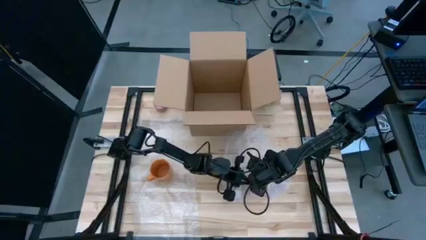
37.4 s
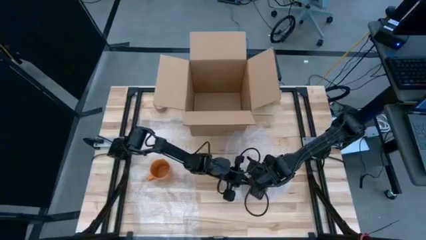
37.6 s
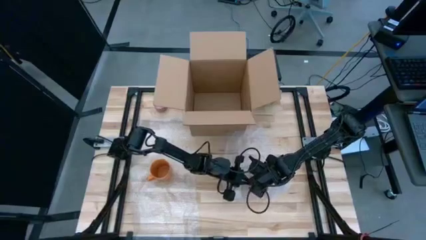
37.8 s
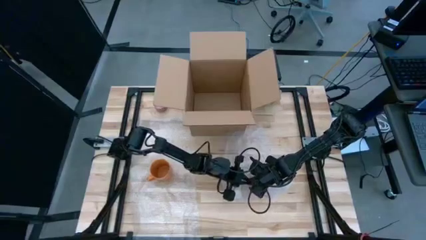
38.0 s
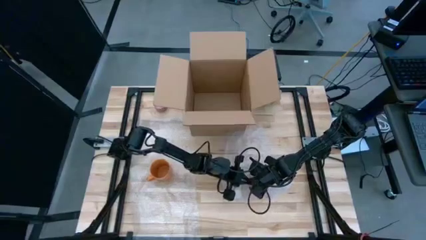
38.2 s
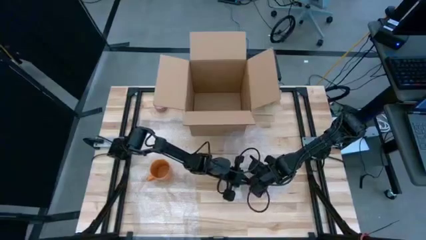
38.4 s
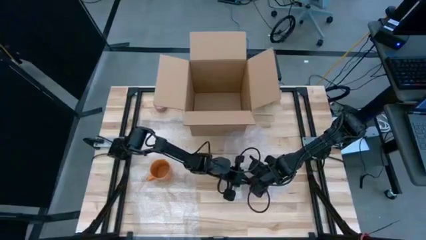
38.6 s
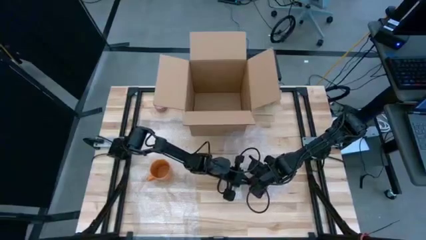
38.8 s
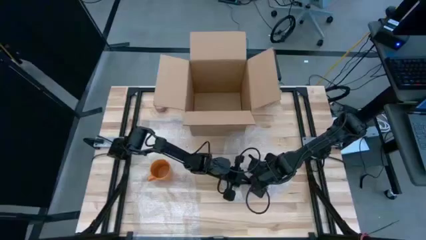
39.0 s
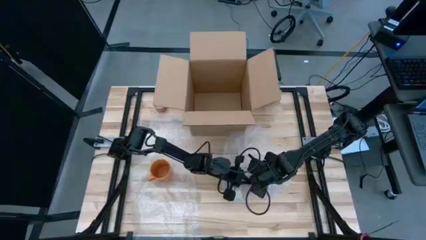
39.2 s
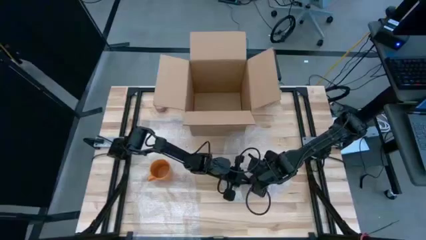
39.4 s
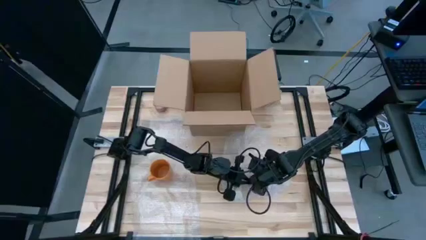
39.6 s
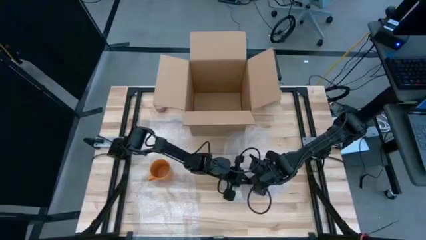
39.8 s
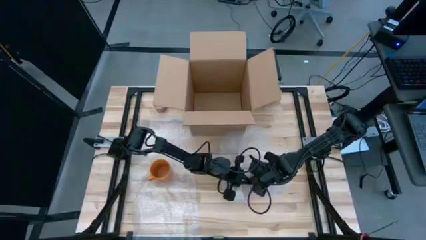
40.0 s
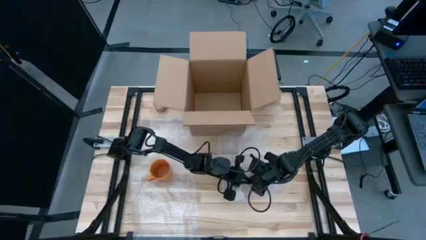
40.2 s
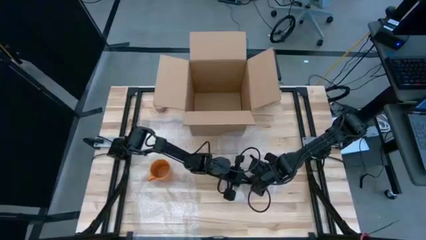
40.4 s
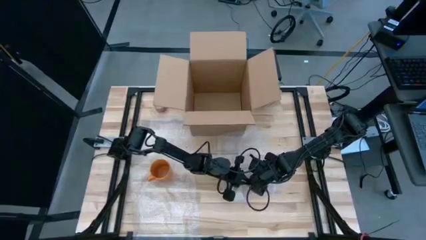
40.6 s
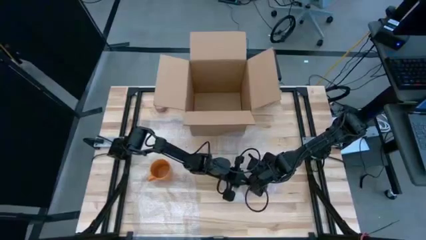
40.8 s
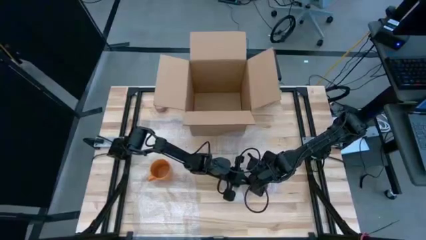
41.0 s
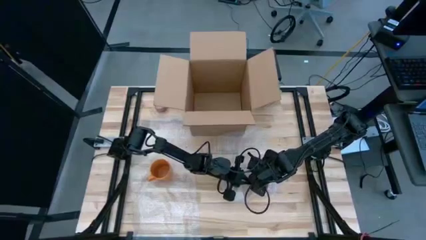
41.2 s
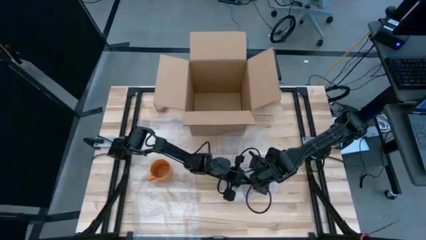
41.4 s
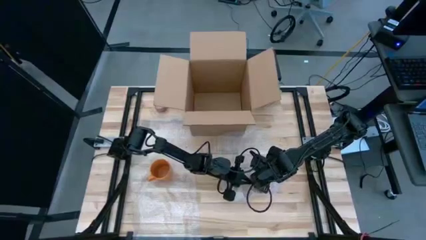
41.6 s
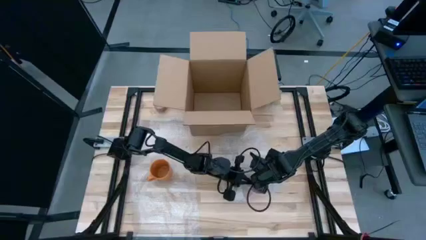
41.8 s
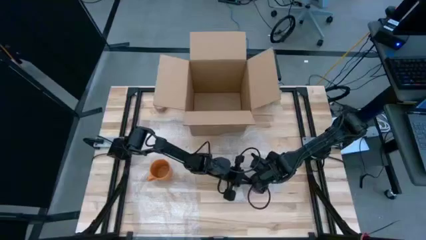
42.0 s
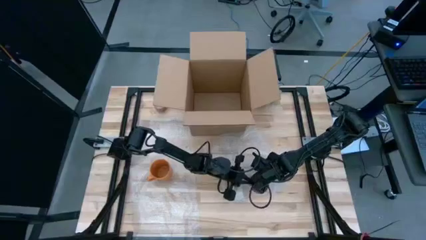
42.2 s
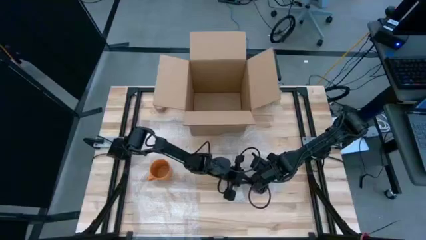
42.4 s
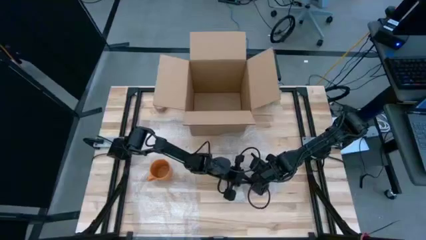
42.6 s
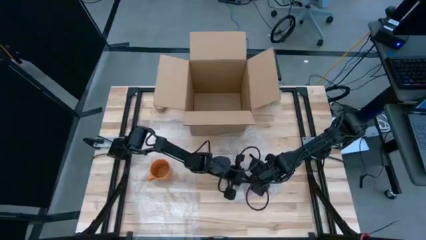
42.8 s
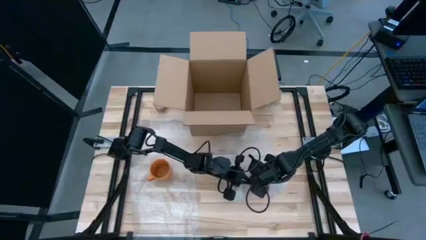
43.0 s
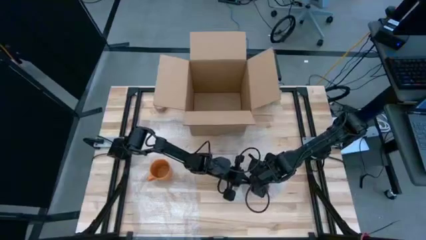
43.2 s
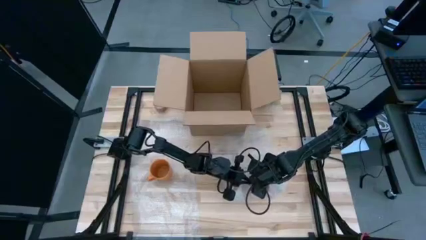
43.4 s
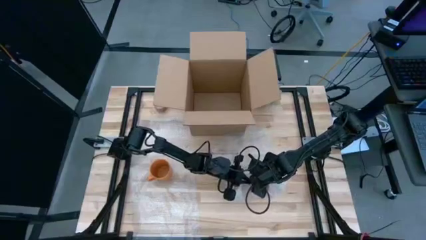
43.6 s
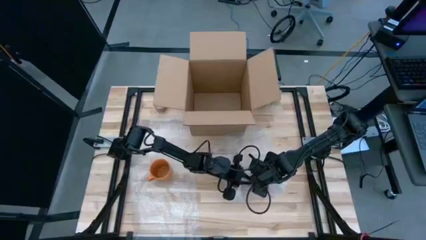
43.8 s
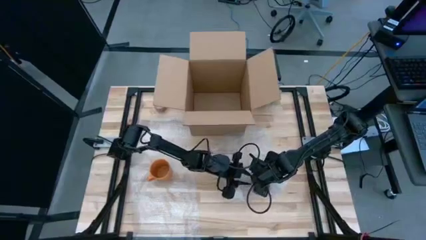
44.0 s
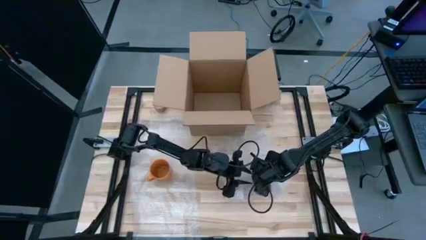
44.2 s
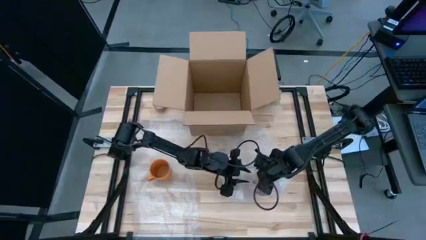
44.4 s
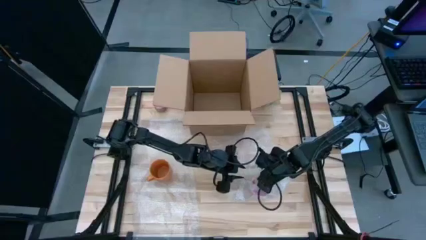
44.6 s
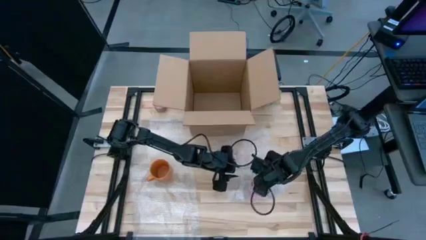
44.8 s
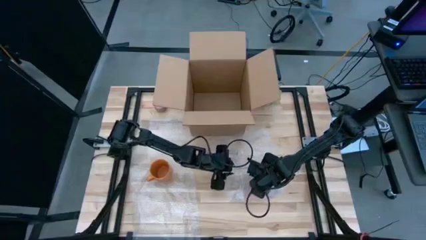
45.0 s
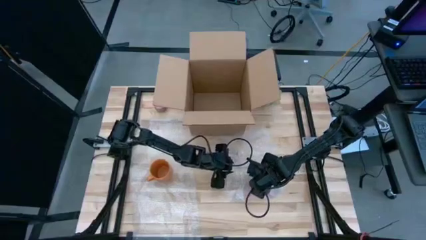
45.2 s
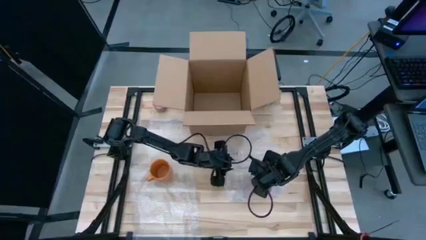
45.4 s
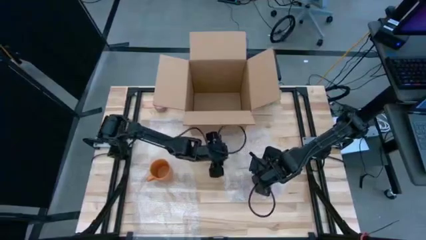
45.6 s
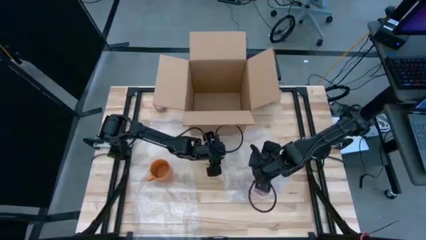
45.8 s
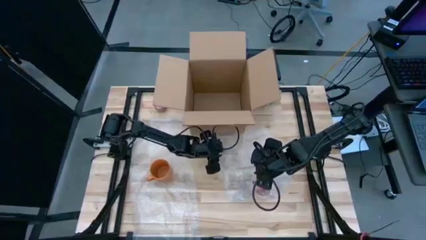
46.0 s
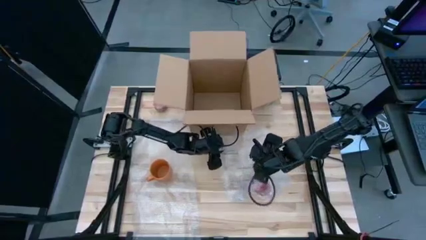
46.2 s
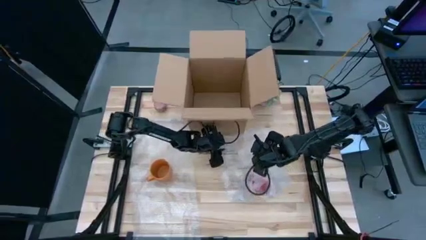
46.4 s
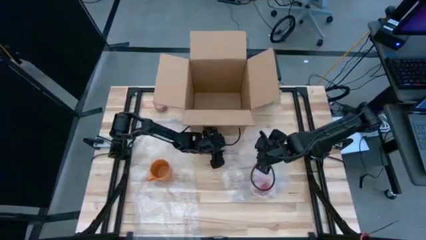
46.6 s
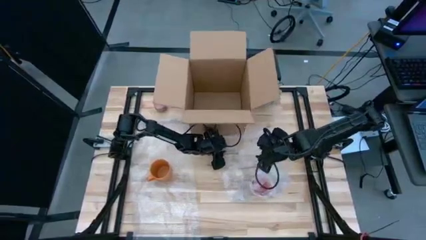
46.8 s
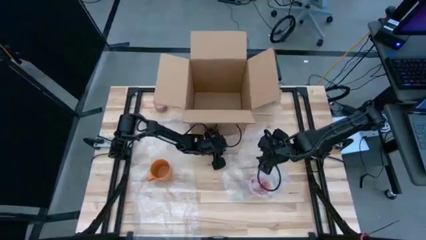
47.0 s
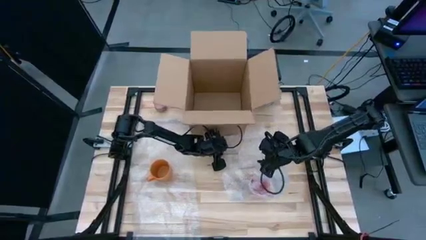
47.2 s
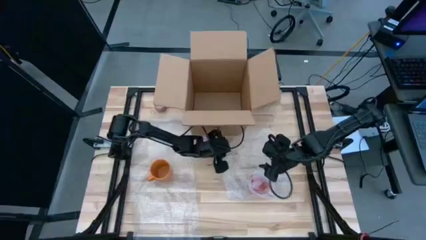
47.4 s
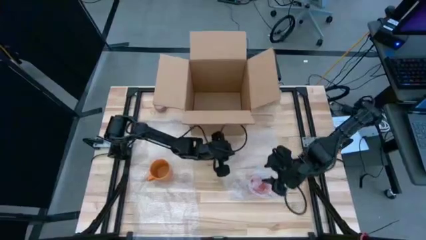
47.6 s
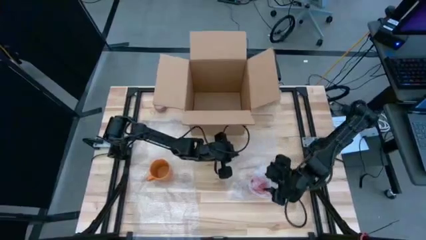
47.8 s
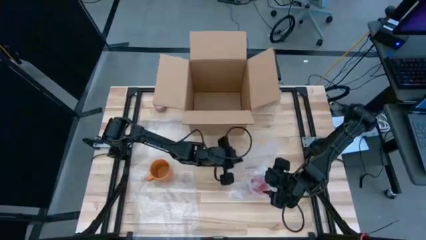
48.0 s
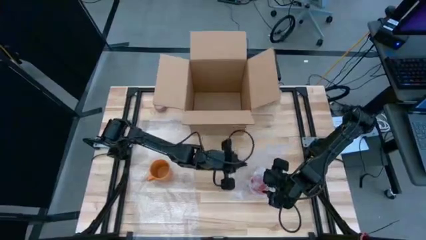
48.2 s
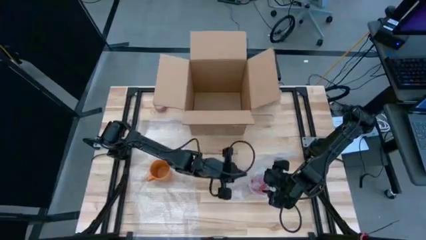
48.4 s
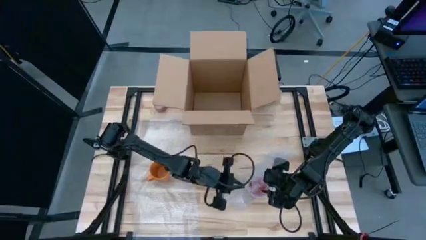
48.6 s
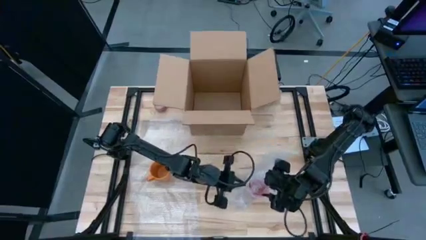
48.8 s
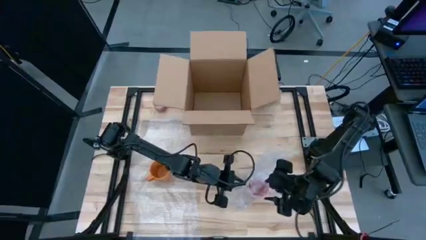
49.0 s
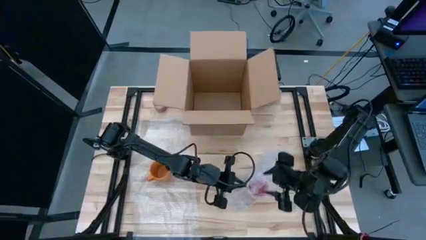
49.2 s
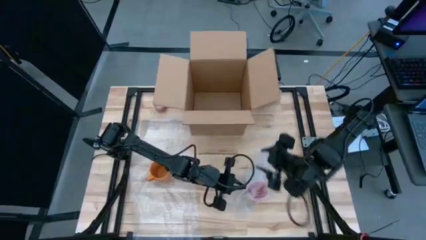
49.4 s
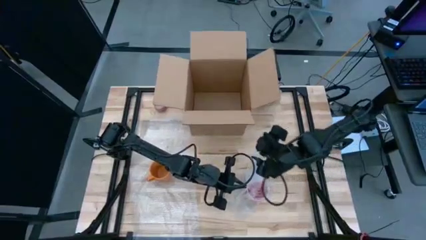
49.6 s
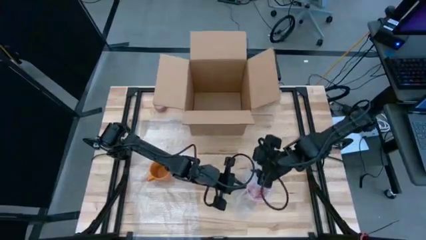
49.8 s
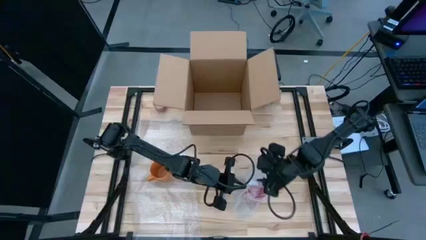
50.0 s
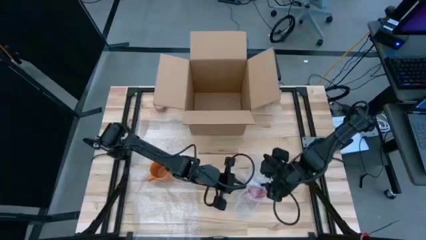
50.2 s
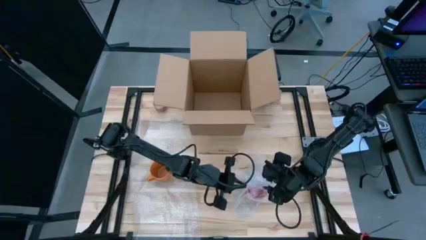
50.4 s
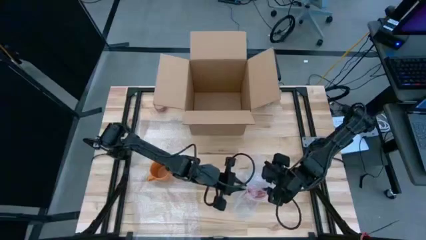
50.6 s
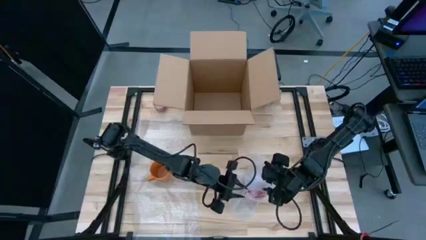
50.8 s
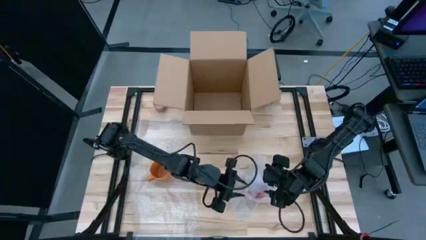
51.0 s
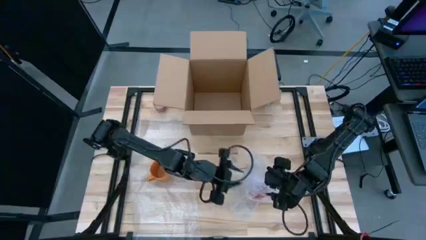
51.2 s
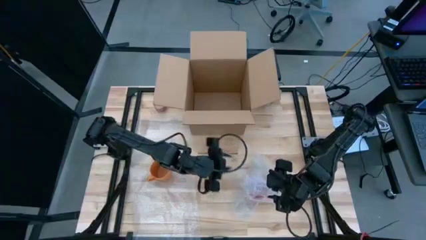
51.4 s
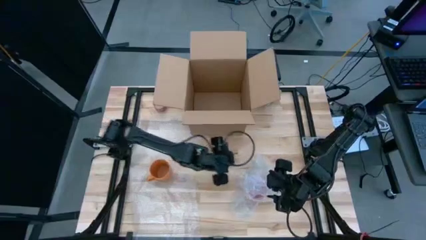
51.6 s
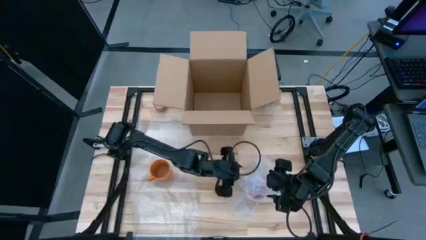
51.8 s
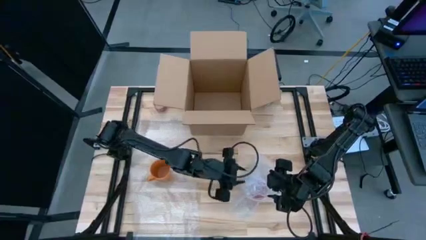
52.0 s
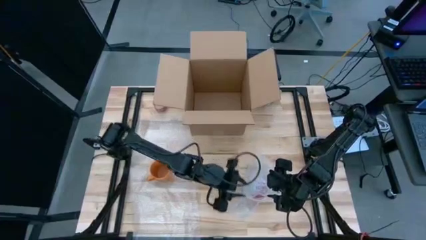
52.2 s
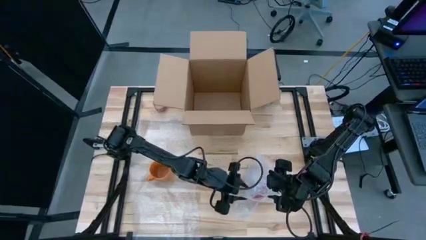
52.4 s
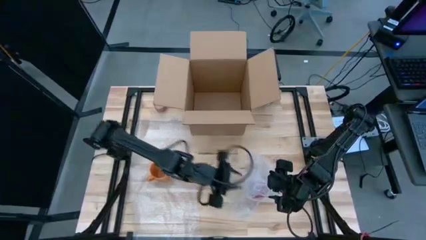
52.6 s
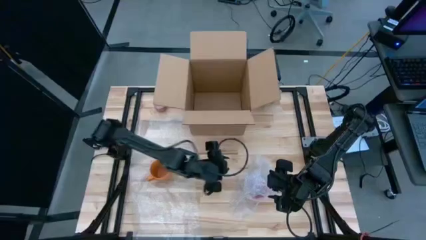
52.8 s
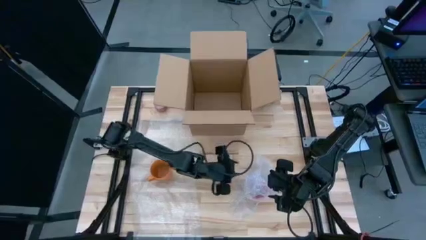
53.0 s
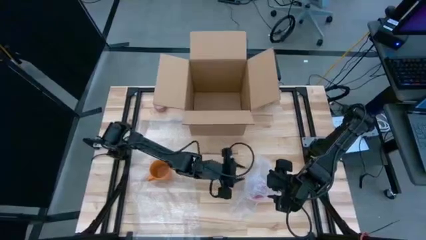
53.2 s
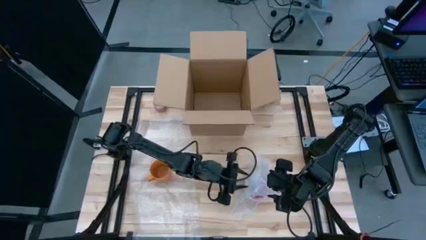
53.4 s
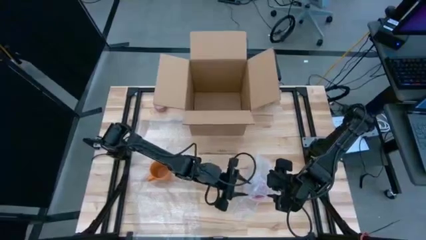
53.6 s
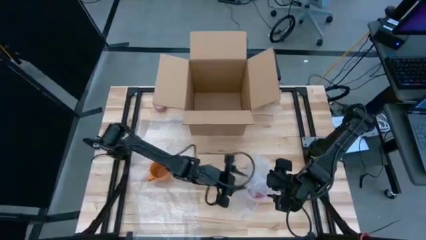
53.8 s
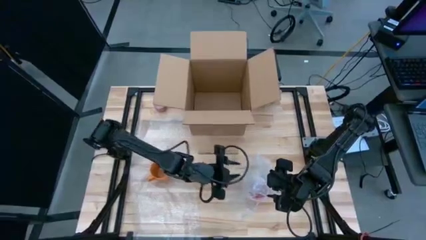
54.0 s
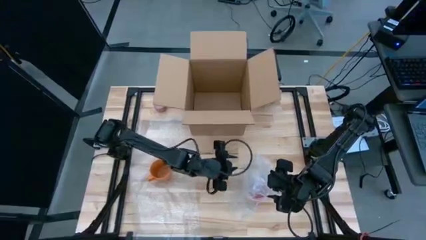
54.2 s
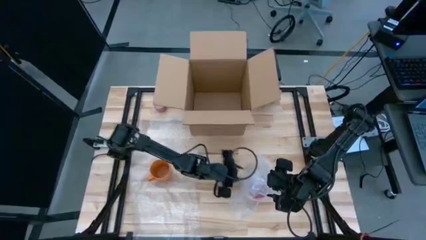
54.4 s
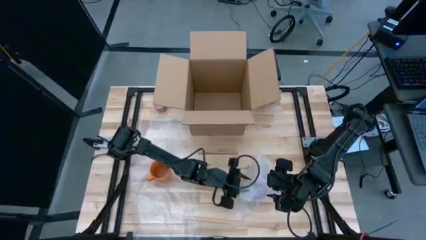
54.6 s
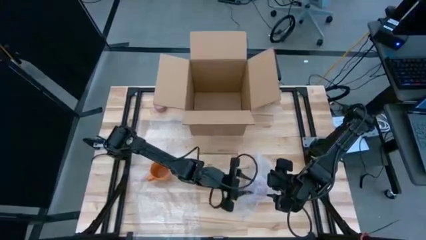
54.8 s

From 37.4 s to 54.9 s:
Task: wrap mug
Wrap the pink cup with bubble wrap
